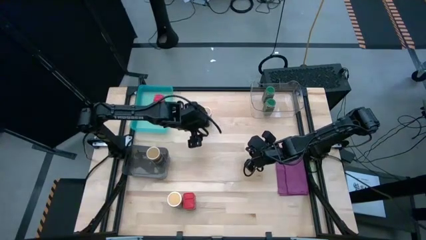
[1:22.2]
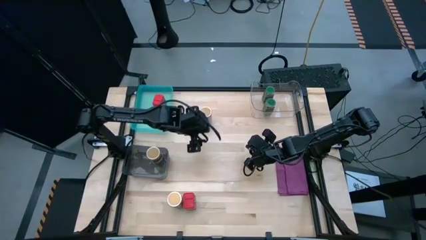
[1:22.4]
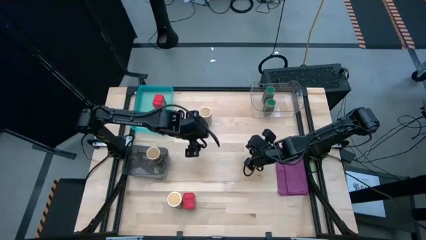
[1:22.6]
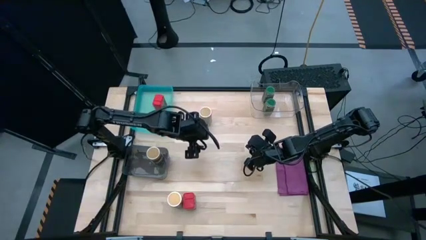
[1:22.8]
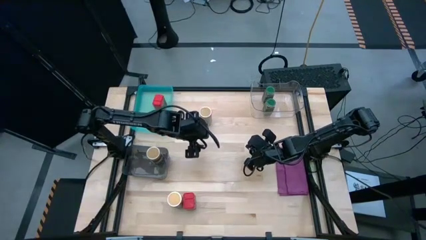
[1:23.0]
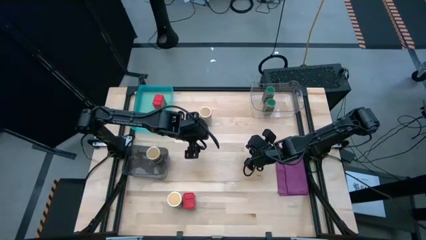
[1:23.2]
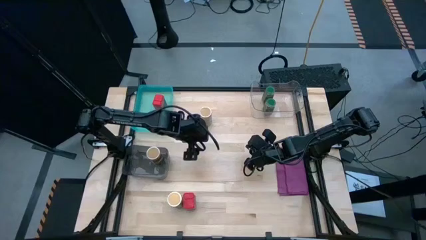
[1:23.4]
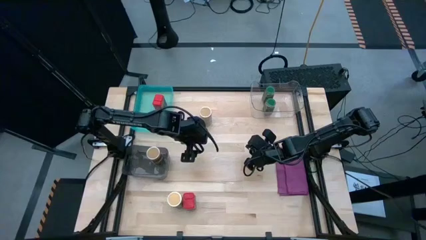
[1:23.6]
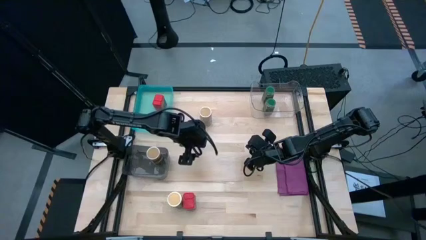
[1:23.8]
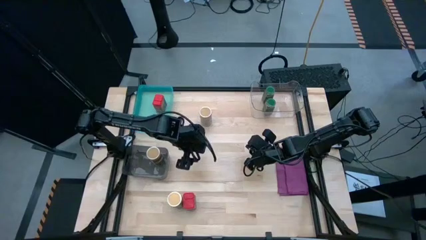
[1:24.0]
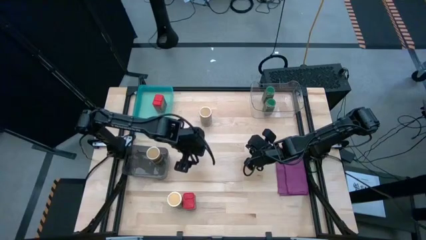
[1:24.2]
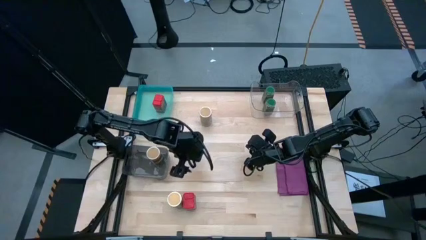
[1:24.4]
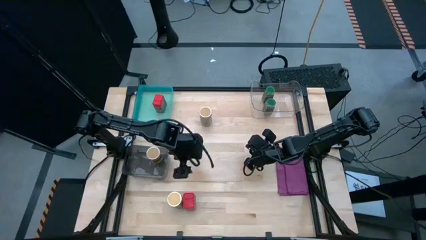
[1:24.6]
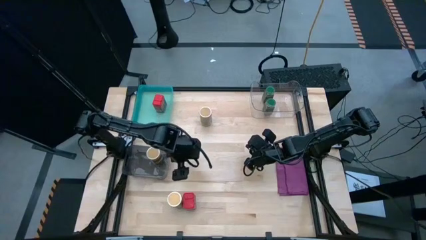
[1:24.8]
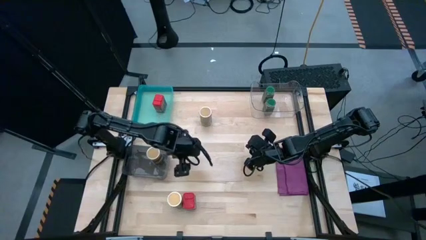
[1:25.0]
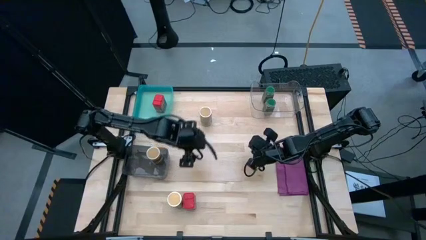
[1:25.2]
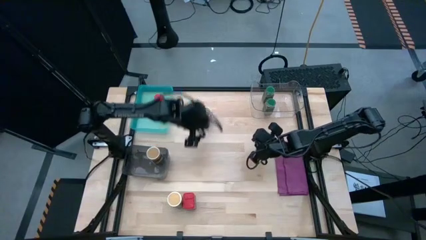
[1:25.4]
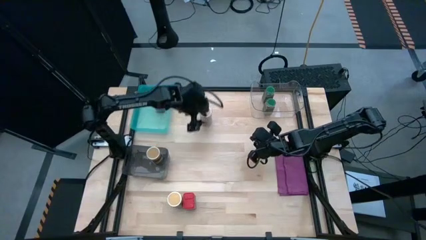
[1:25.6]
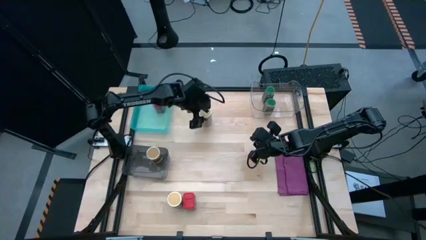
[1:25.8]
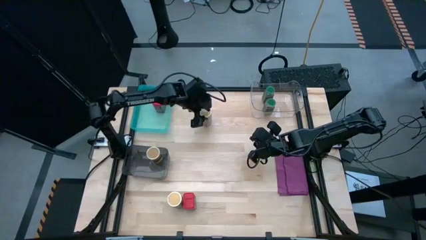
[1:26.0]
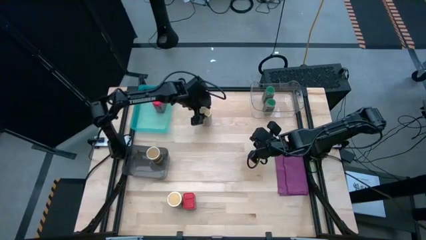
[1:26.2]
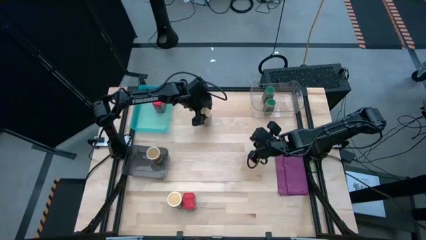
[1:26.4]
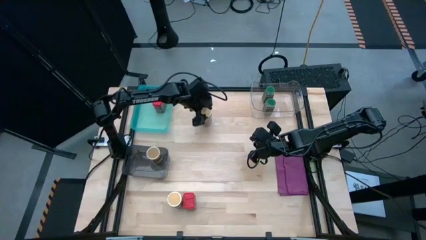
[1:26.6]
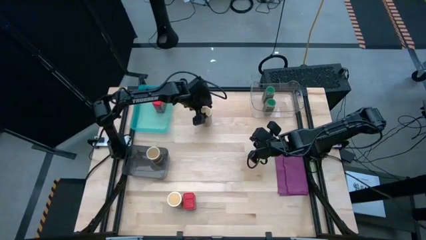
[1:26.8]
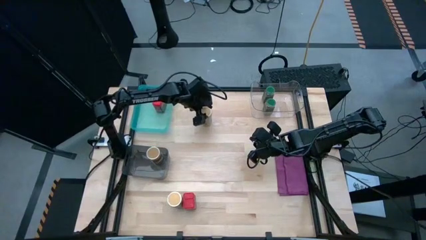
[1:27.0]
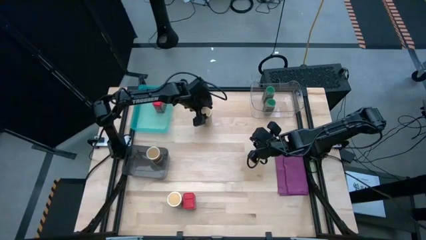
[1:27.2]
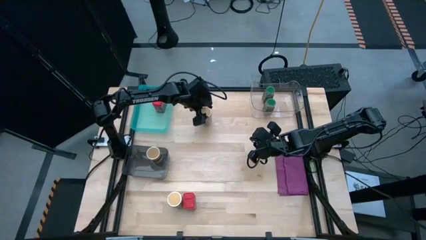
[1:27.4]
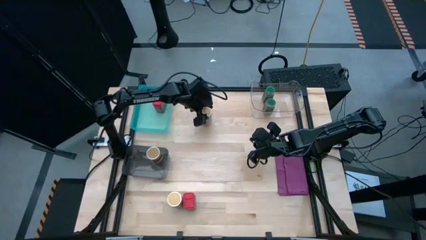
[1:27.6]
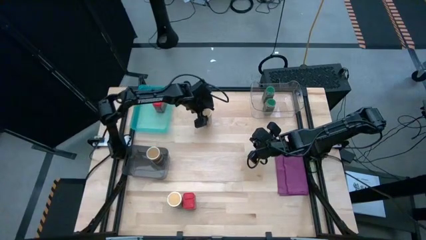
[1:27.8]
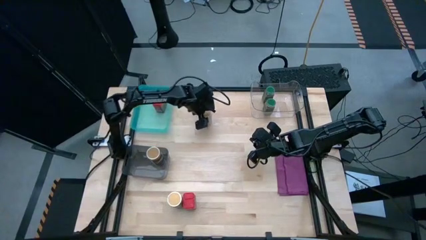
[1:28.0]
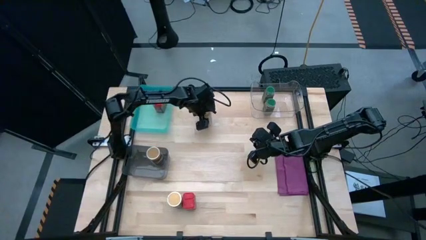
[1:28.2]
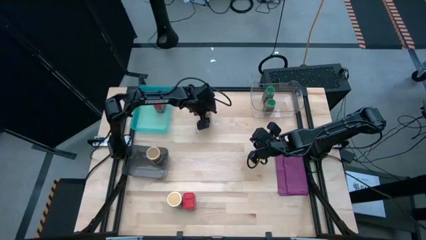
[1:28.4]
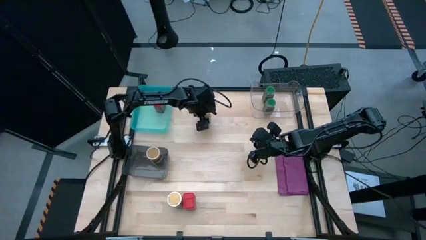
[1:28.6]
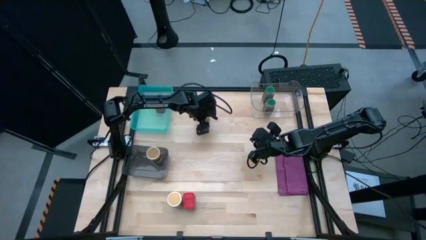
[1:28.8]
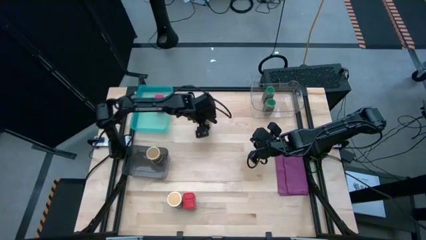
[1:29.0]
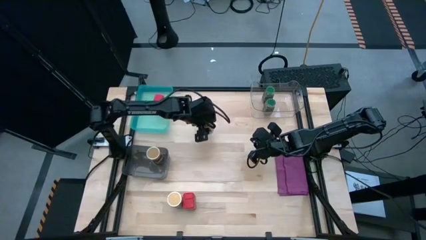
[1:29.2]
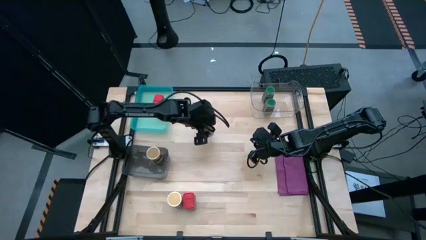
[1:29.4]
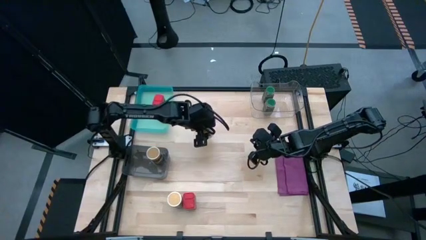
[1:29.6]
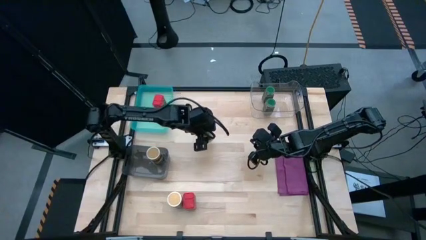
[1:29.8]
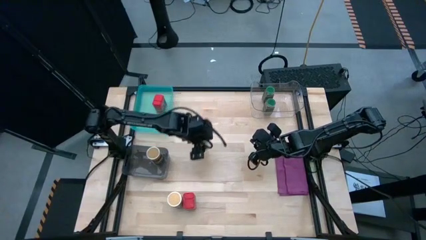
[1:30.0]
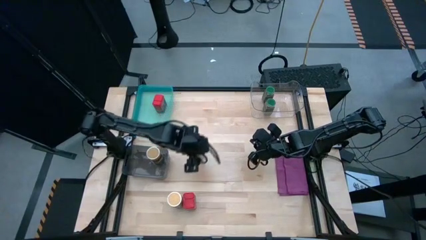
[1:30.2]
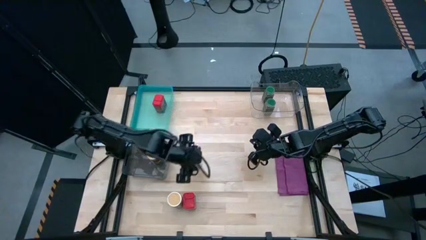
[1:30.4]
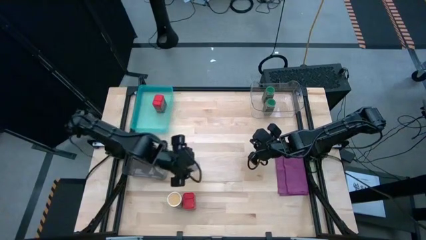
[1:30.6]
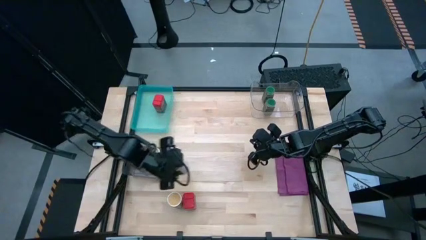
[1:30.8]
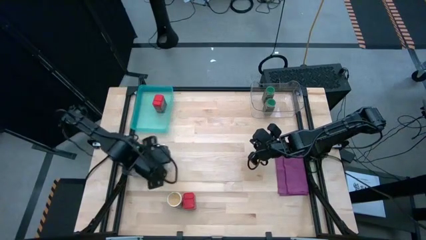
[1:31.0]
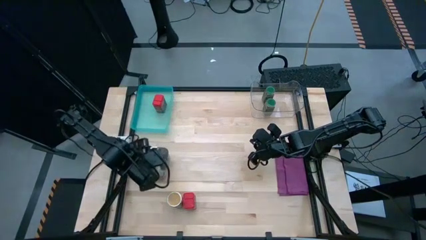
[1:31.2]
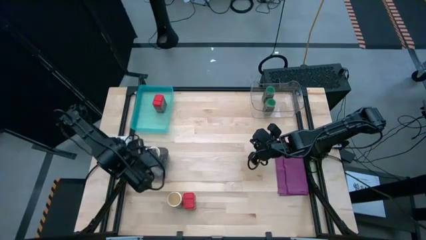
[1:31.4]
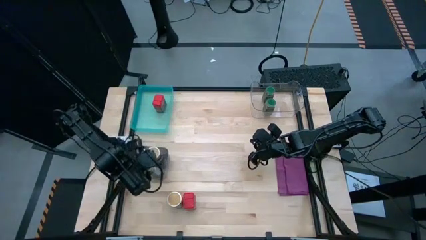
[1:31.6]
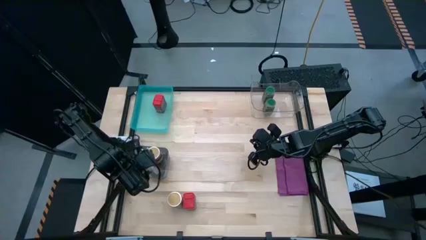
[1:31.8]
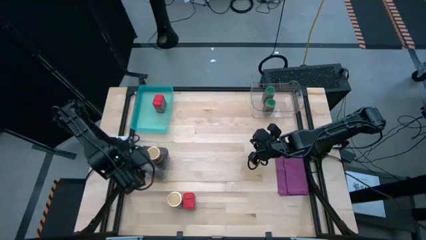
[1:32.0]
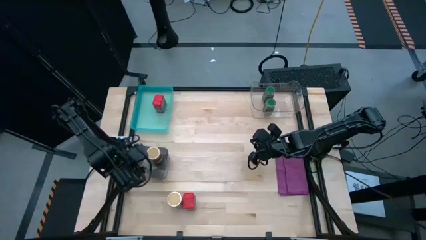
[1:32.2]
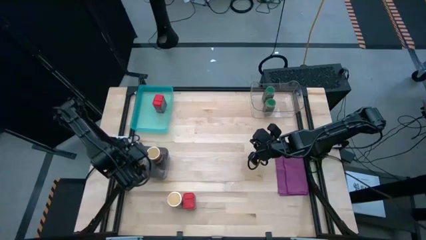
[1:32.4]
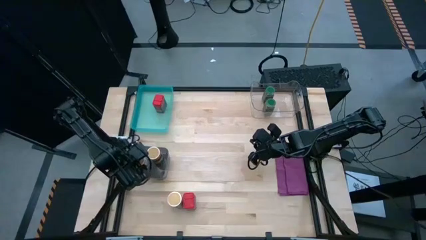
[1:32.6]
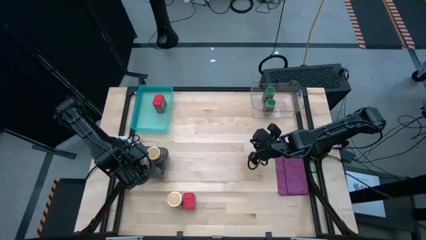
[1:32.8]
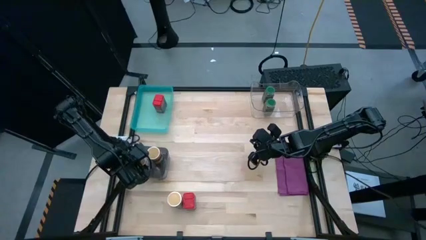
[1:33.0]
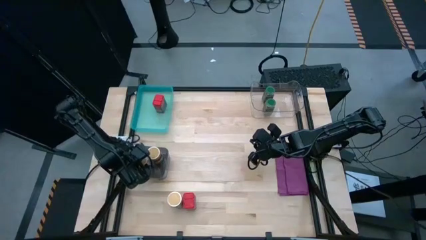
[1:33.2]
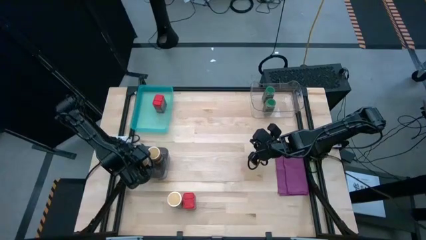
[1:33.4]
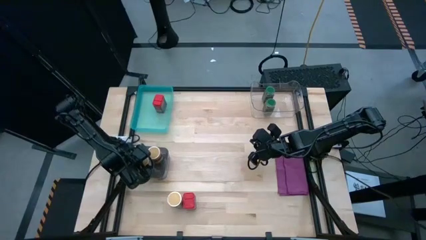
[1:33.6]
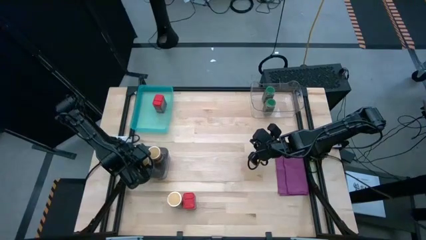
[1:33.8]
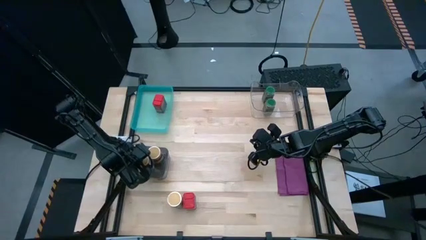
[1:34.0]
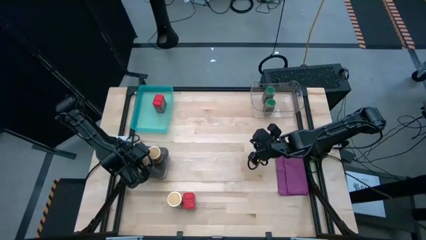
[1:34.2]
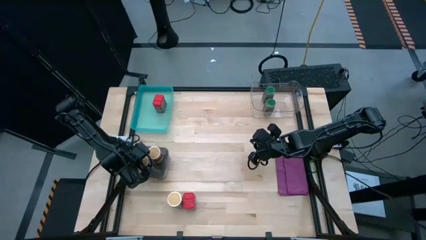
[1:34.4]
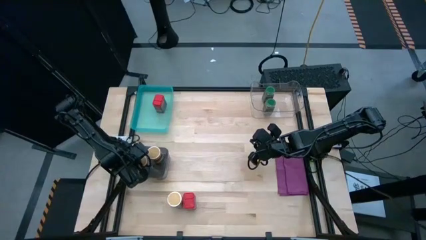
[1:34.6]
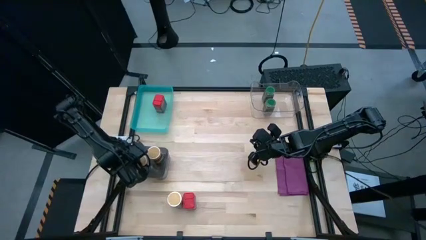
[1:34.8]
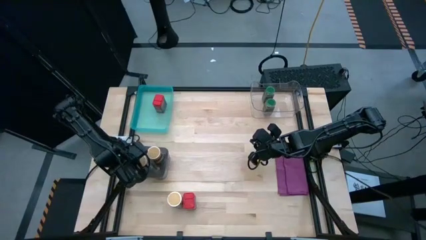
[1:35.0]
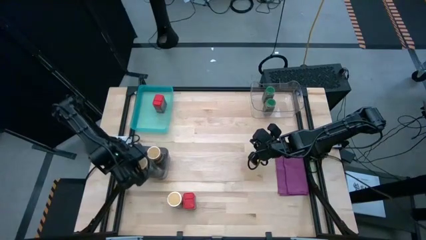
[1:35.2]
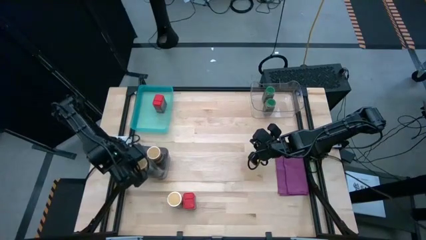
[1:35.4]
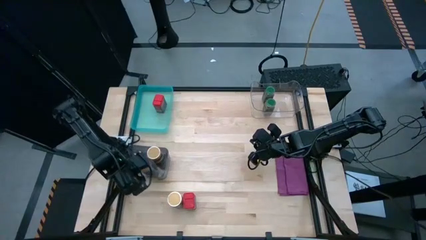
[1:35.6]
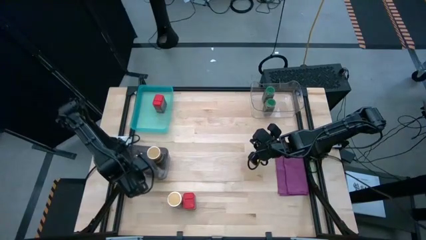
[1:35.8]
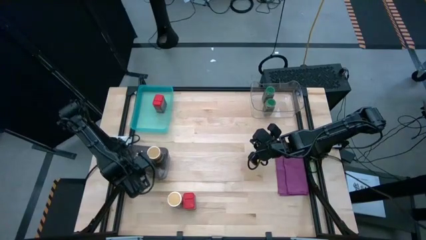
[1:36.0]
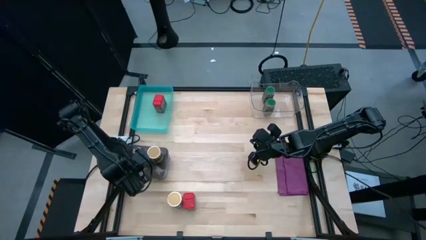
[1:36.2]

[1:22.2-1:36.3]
Task: Sort spices by type
Put the top gold seasoning bottle into the black bin
